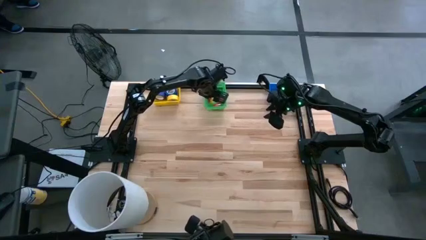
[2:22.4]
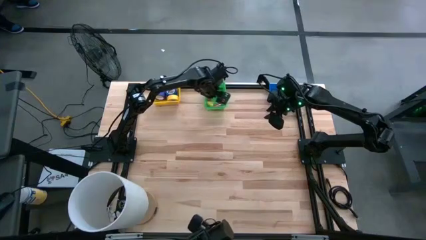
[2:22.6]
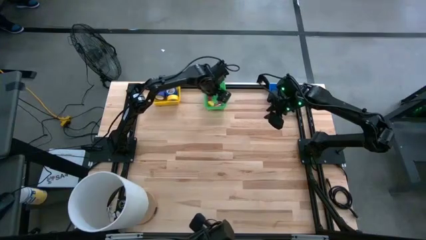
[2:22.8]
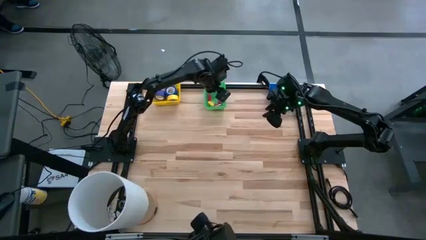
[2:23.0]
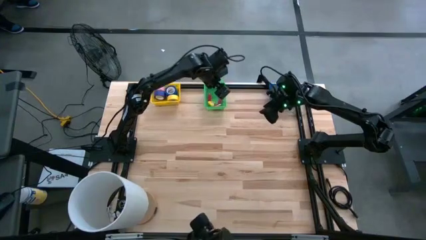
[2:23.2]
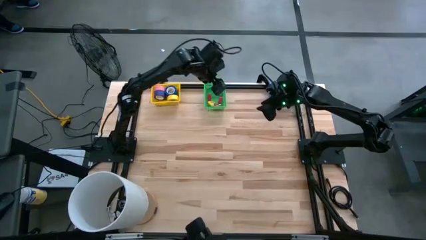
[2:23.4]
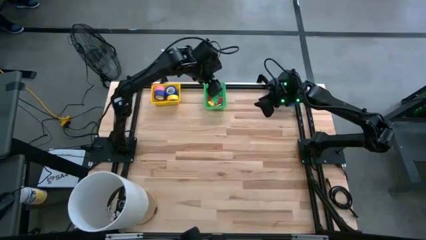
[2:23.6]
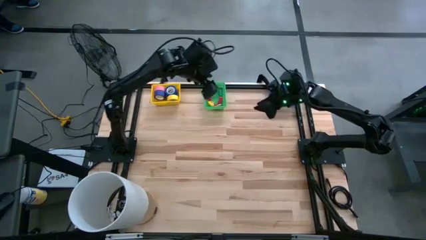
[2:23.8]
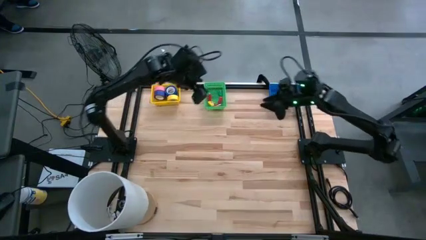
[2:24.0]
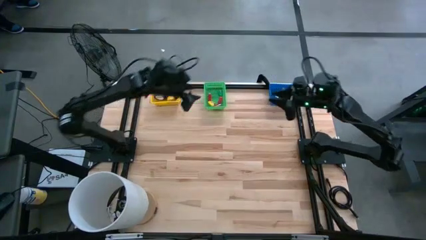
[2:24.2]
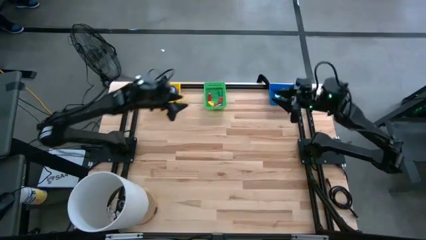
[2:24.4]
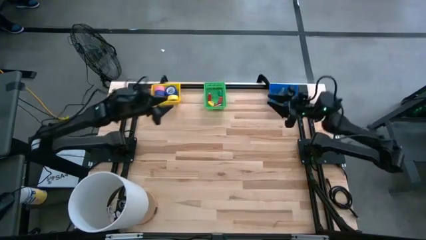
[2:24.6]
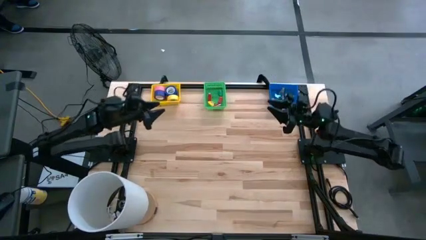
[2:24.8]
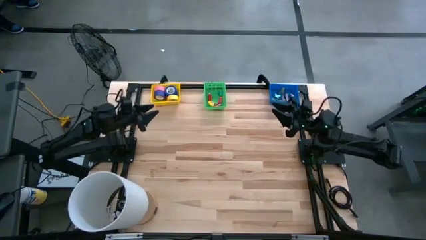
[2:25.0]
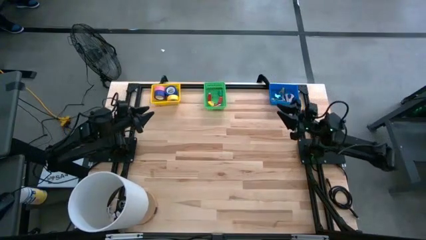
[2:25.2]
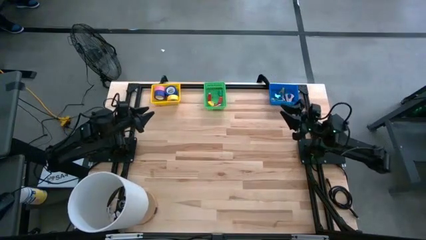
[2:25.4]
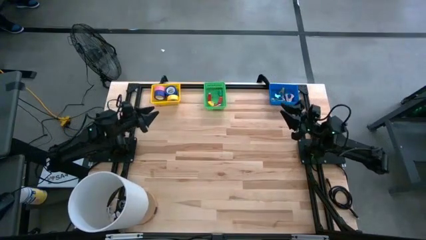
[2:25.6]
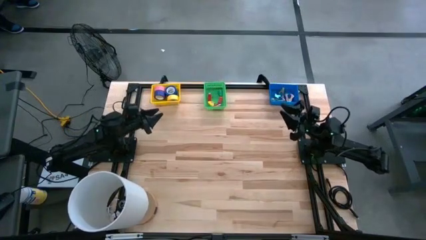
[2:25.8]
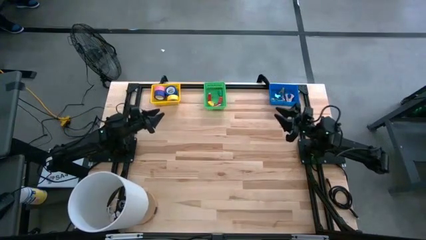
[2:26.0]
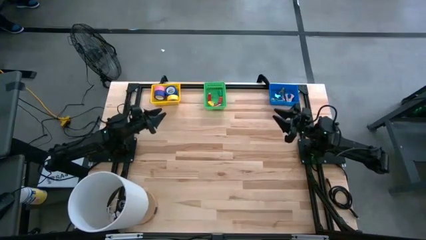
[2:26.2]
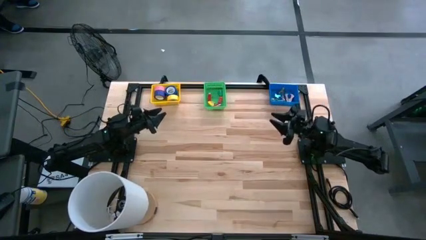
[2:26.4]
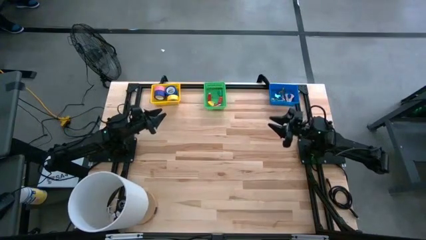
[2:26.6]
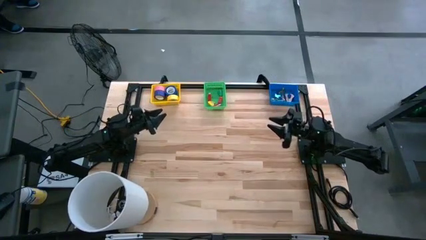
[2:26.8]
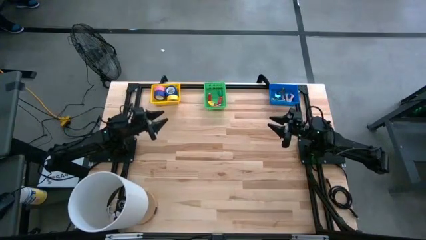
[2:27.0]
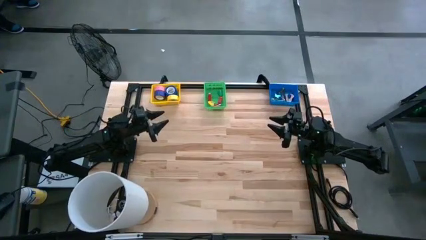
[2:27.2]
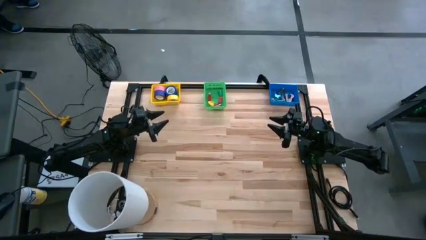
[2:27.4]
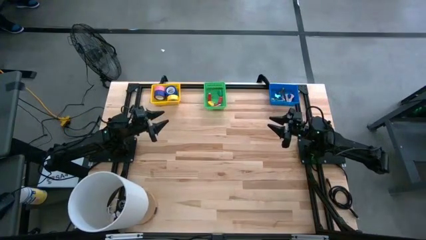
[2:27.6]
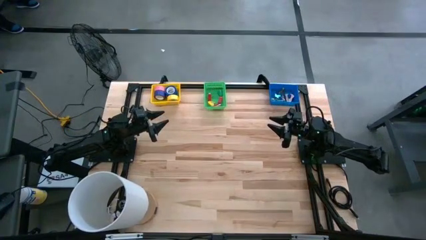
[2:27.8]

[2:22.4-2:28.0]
Task: Pick and place Stapler, Stapler remover, tape
Return to Home Position

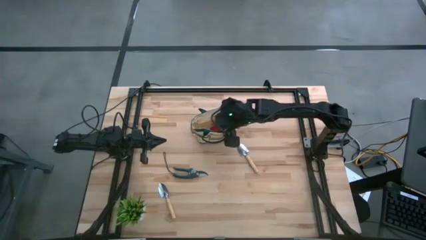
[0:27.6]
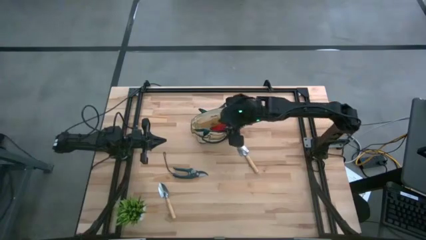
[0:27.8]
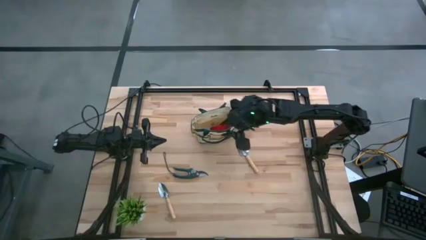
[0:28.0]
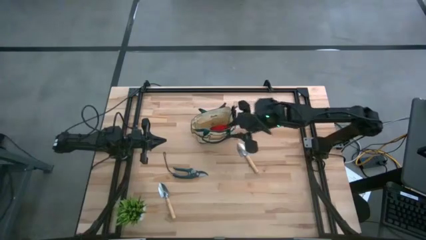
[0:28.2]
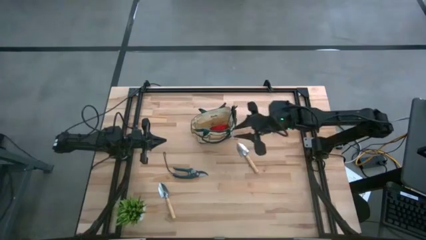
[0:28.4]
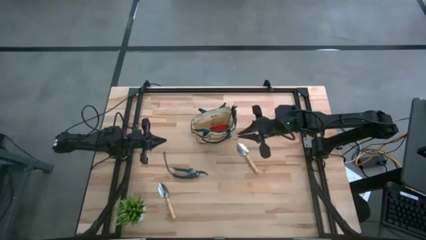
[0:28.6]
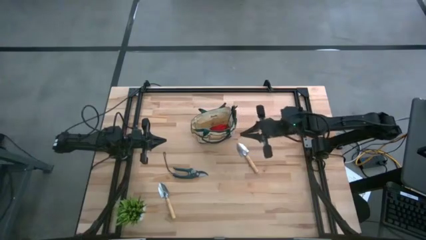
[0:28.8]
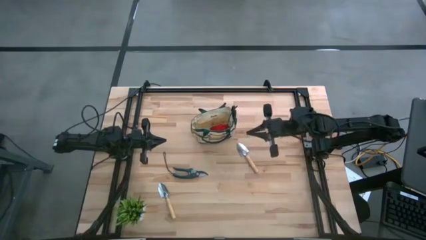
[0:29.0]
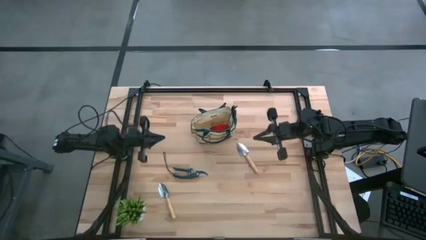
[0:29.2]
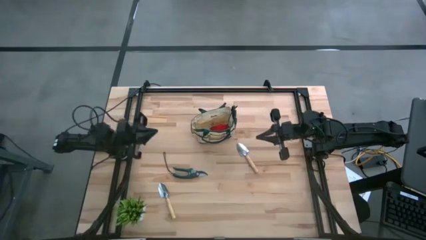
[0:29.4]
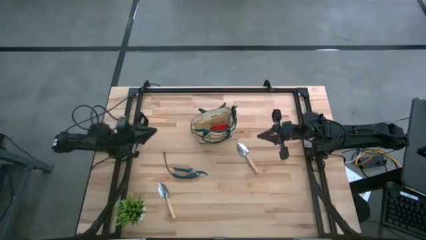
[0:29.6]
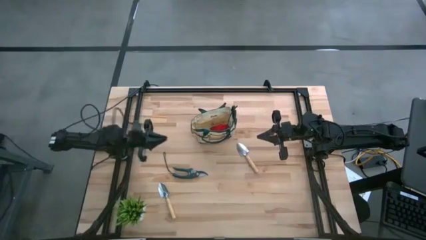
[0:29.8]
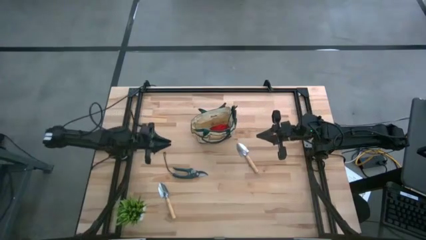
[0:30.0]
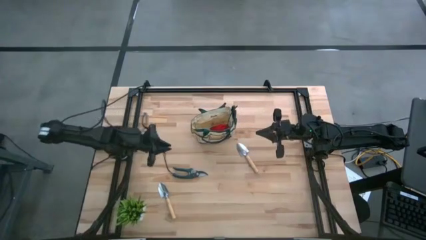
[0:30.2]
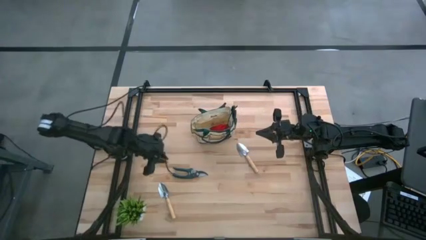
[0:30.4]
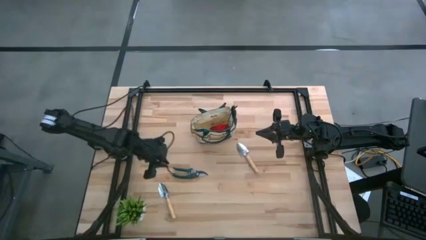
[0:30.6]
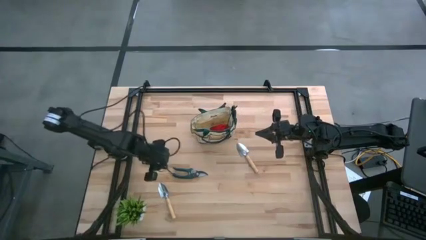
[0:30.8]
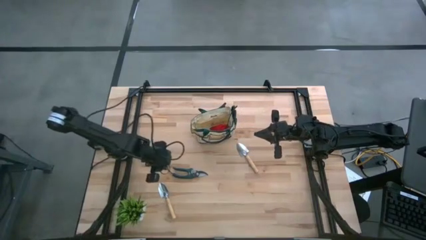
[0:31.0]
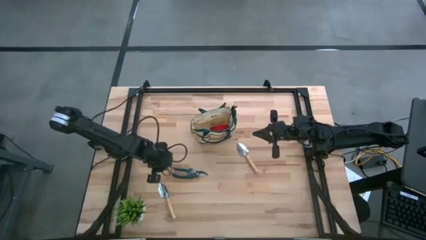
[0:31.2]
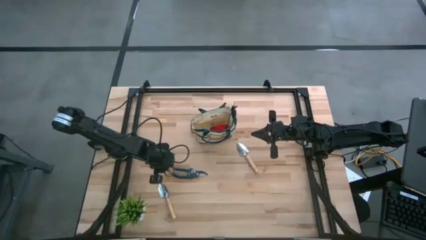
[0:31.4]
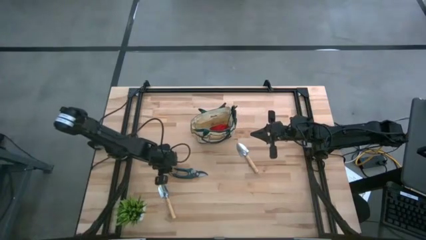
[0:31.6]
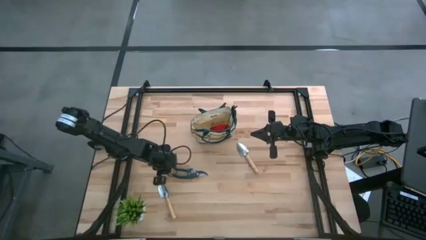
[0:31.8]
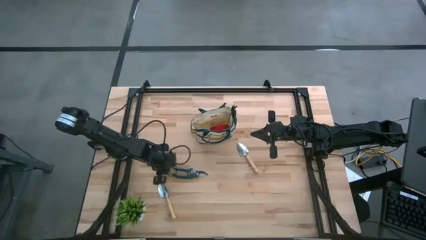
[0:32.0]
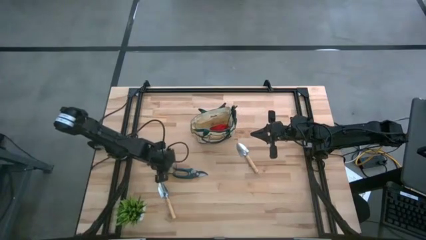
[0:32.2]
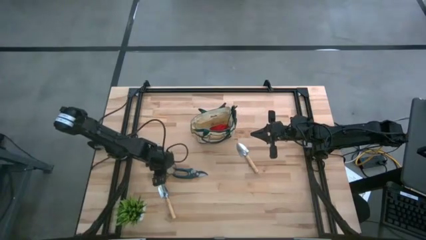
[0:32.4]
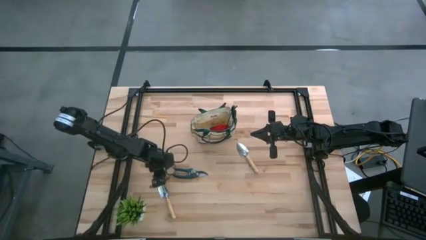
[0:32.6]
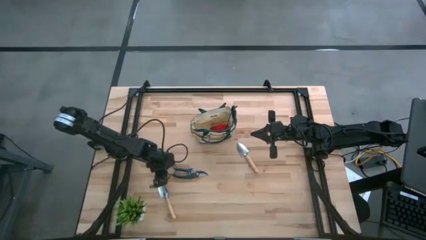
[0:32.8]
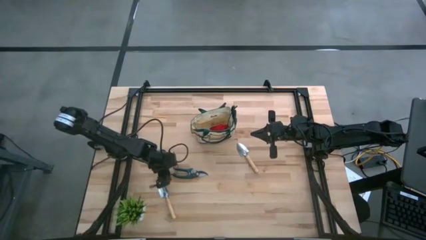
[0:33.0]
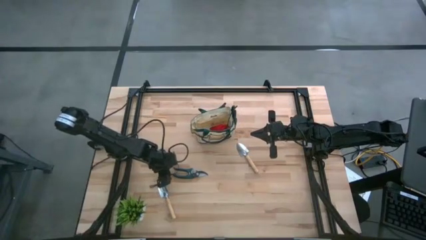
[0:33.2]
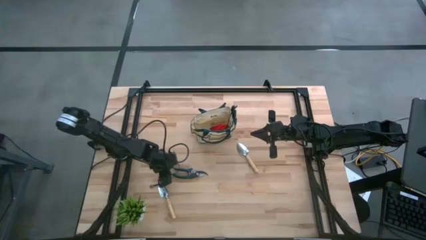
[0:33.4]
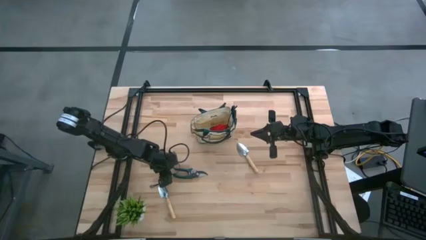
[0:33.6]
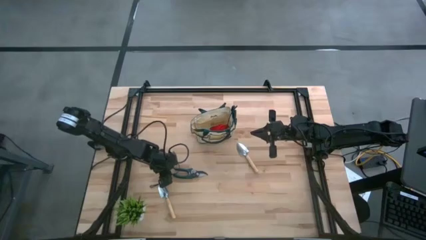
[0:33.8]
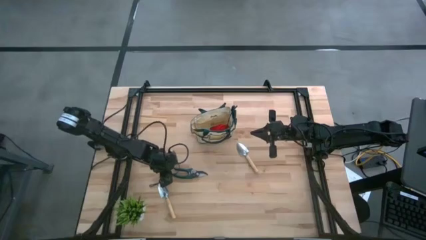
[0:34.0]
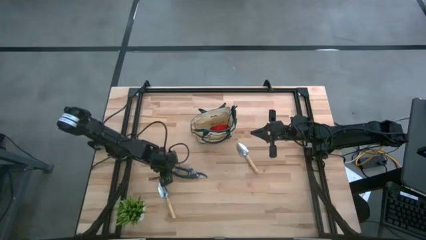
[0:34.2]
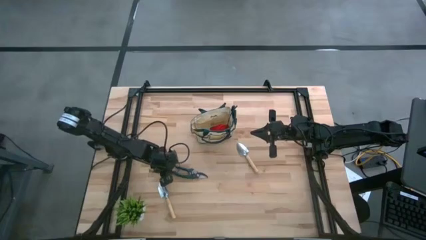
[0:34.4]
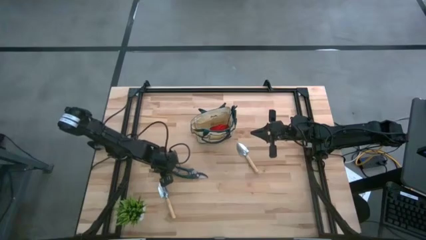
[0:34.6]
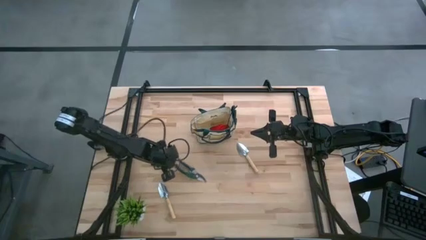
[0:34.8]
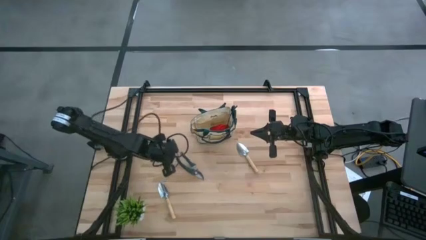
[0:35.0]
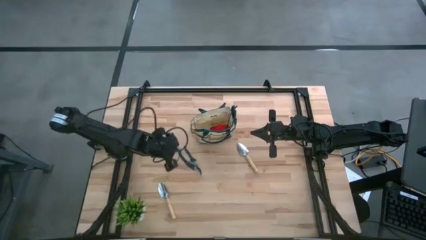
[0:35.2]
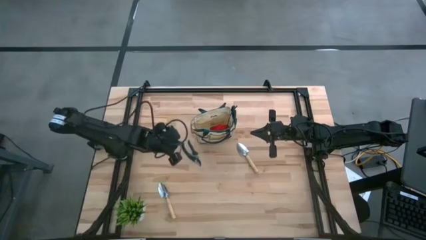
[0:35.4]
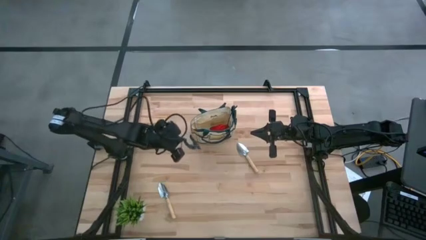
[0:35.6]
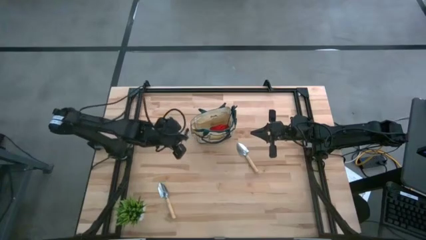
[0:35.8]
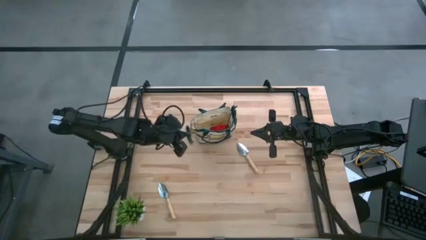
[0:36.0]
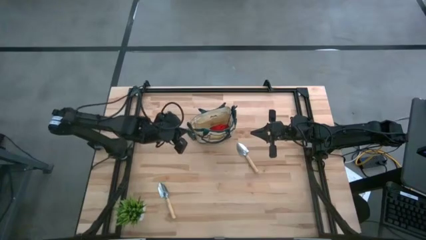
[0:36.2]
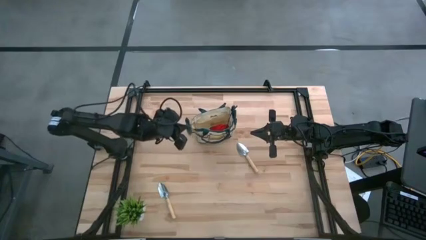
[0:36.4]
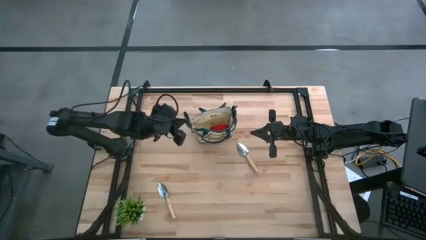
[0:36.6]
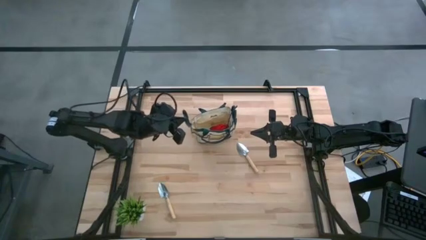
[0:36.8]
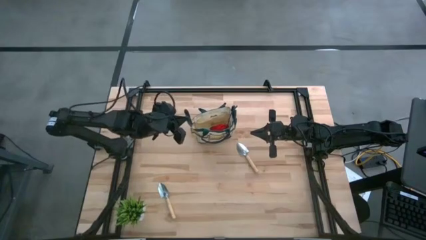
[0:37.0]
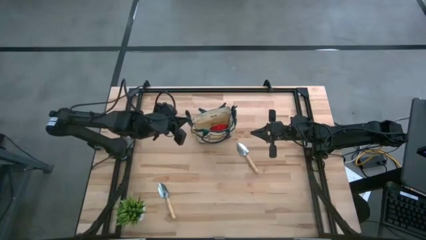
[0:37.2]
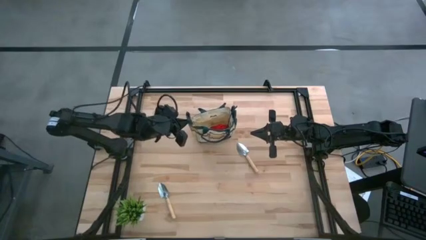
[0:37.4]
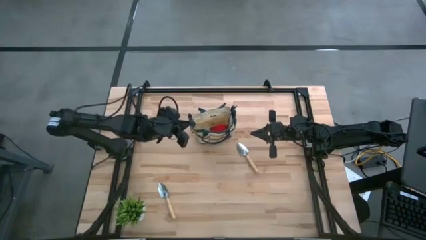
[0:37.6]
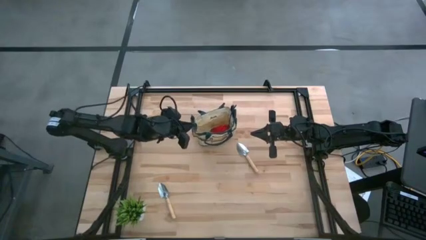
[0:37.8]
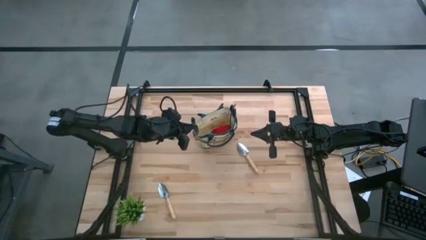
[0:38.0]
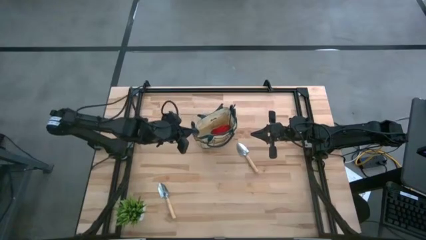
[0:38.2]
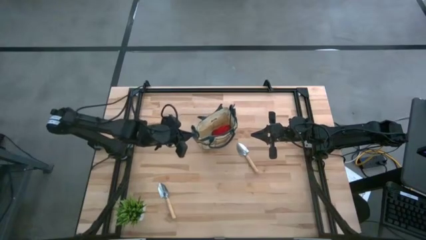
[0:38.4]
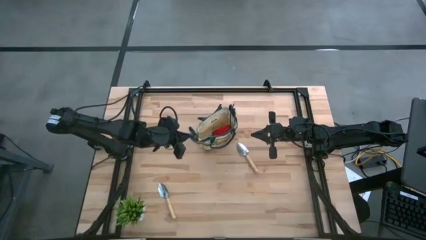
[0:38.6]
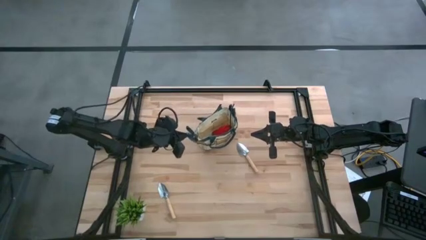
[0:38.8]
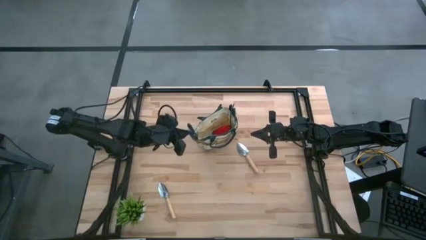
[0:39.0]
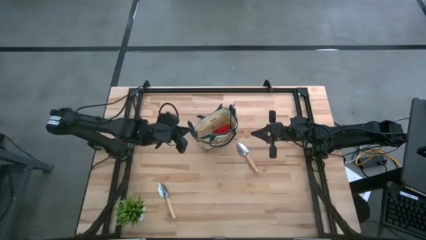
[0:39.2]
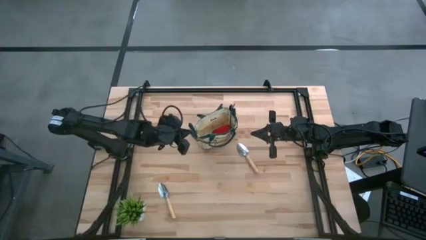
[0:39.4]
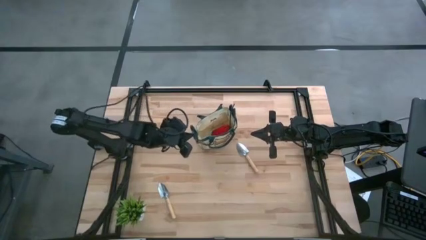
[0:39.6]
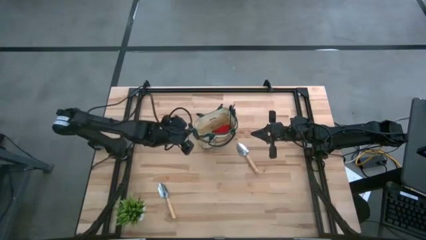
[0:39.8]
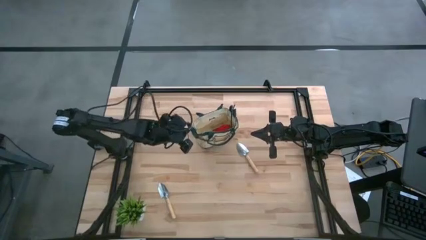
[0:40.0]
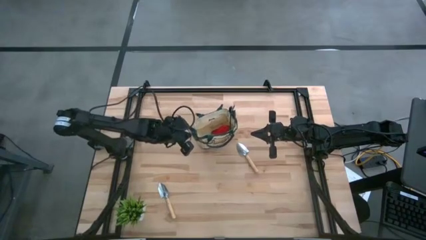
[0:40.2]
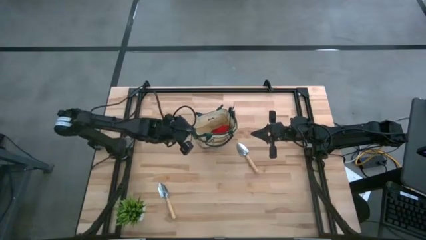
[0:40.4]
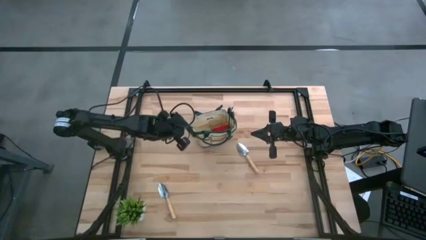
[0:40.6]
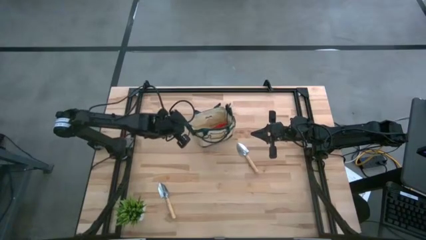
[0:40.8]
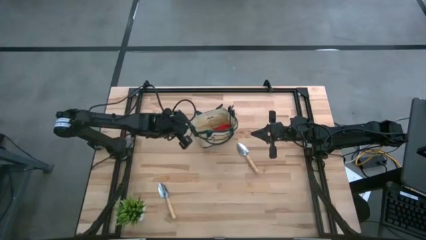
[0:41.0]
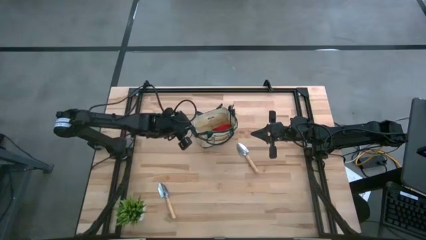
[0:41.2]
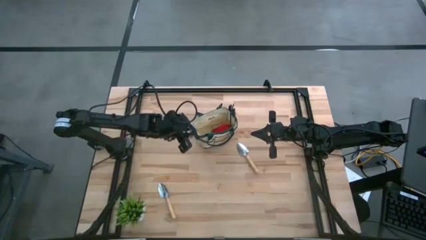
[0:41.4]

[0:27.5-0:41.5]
Task: Pick & Place Garden tools in Gardening bag
Put the green shear scissors into the brown gardening bag
